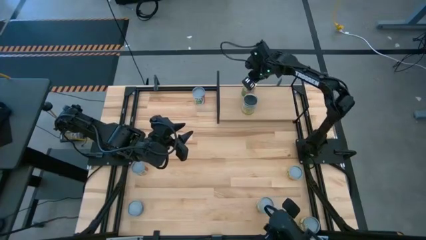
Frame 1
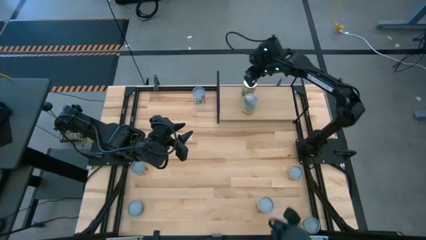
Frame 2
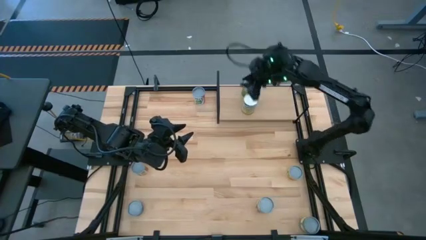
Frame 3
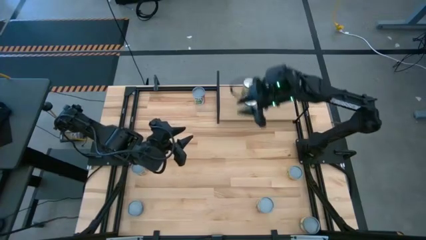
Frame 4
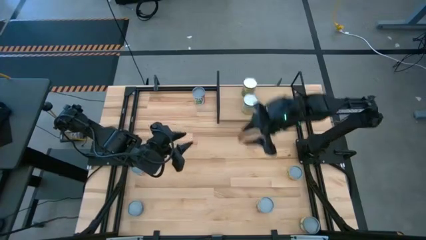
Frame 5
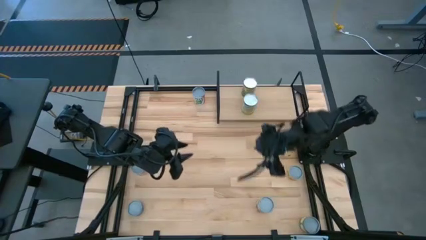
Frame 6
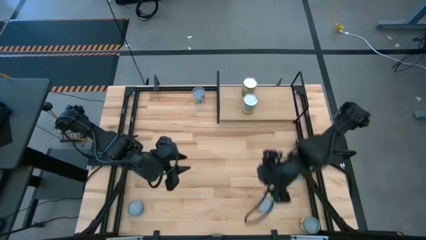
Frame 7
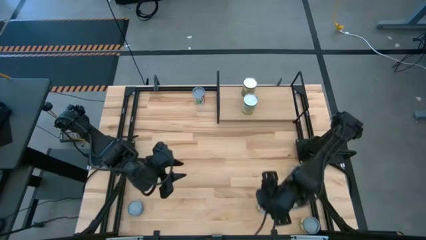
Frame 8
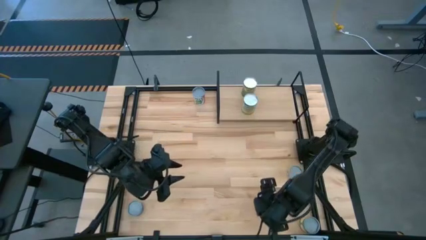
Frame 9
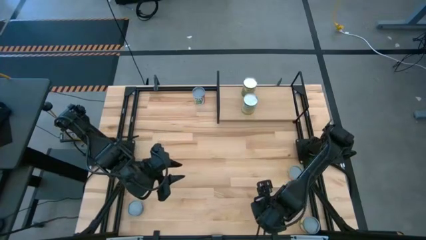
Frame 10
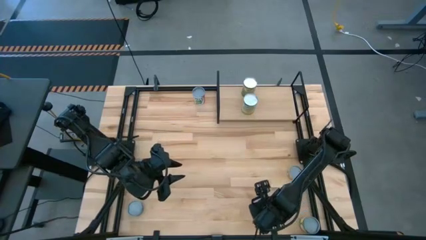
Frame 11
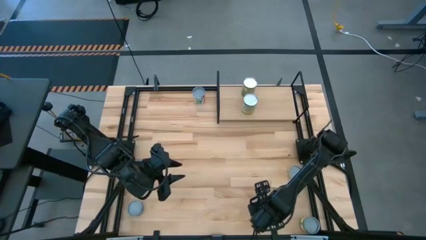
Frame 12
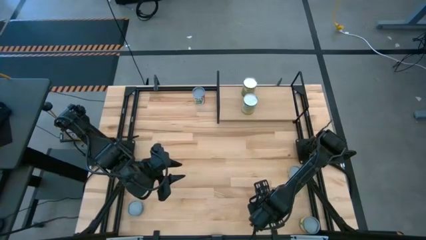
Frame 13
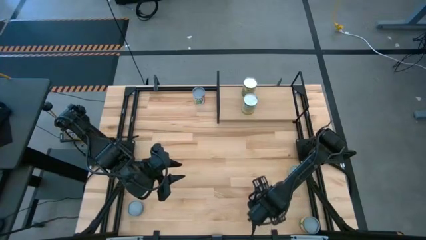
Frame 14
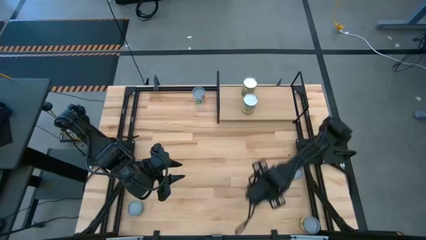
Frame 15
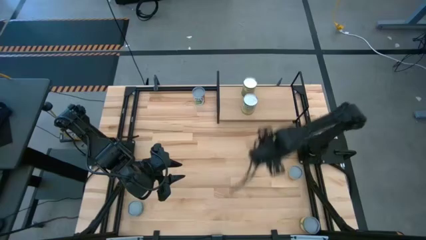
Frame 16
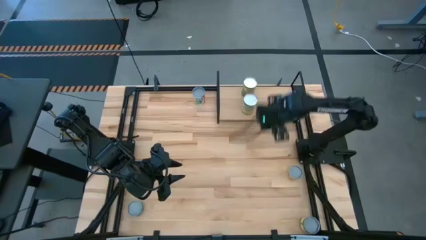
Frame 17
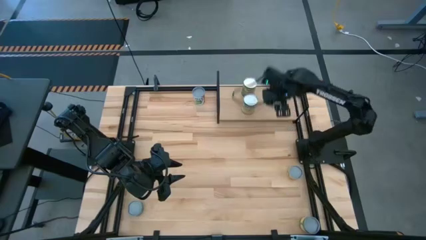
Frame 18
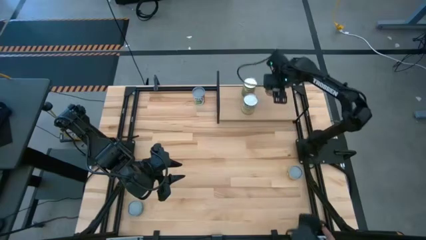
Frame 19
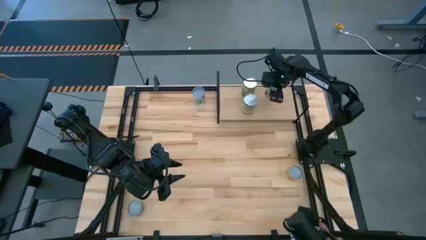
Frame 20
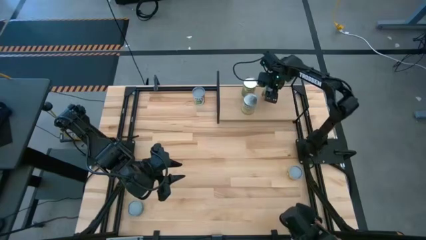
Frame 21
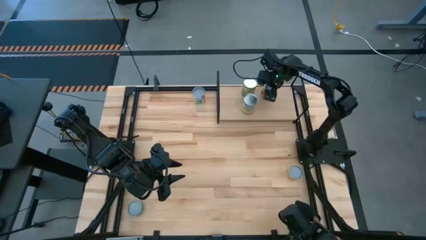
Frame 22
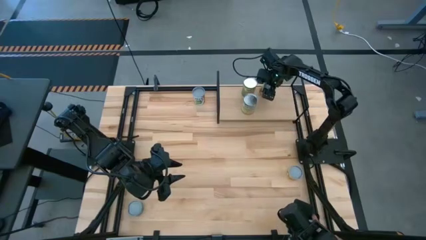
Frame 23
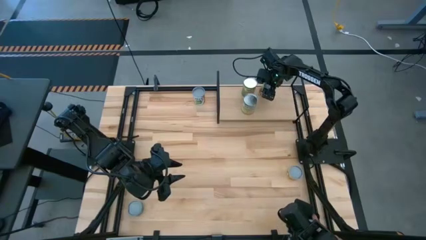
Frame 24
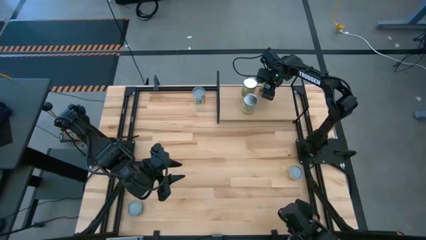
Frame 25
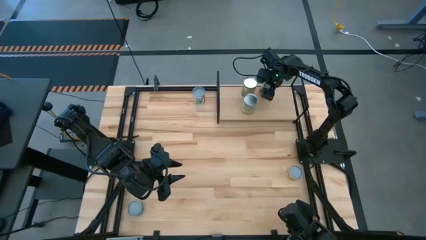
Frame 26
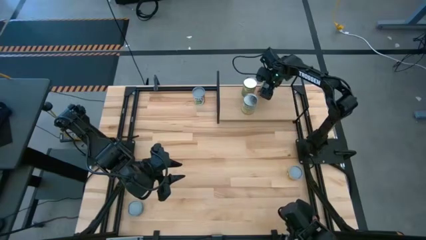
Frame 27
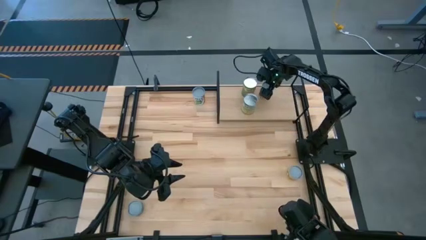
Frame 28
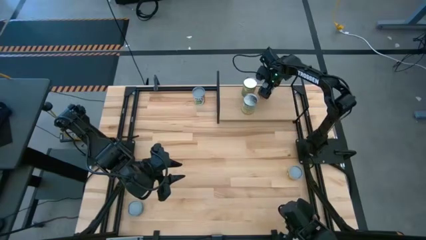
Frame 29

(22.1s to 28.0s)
Task: Pick and place cans onto a shelf
Put the green/red can on the shelf

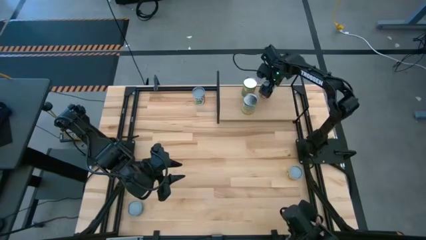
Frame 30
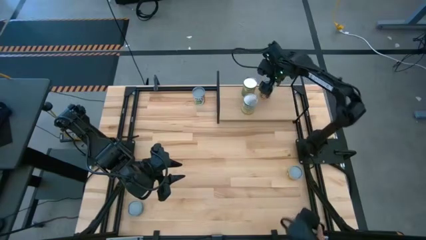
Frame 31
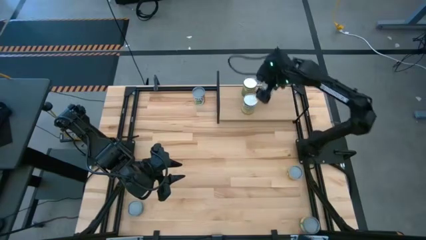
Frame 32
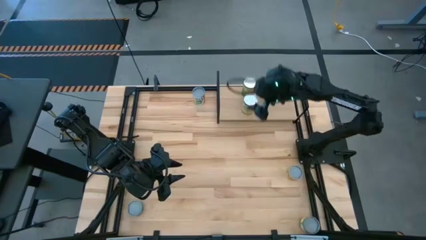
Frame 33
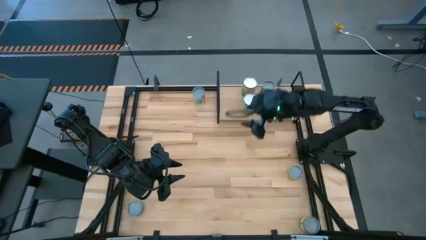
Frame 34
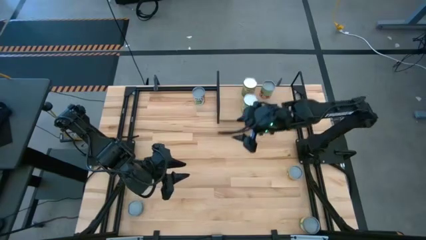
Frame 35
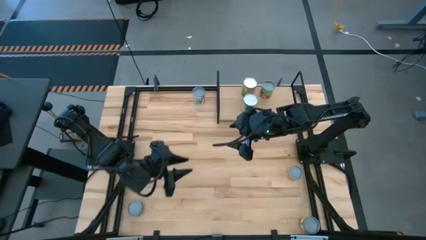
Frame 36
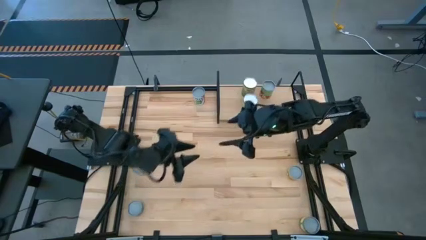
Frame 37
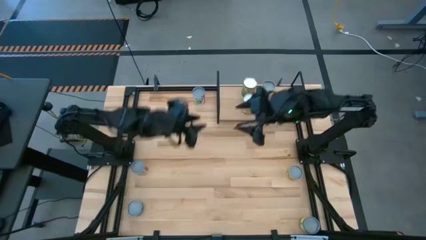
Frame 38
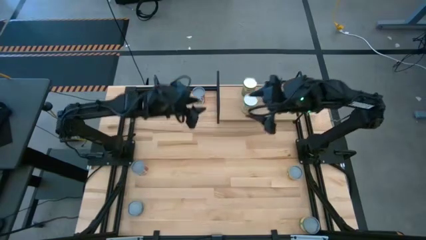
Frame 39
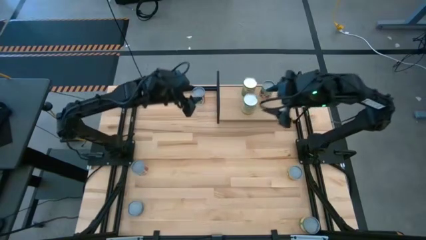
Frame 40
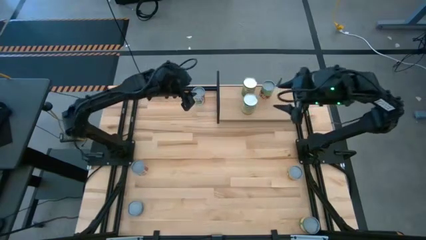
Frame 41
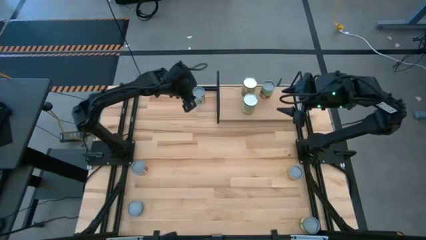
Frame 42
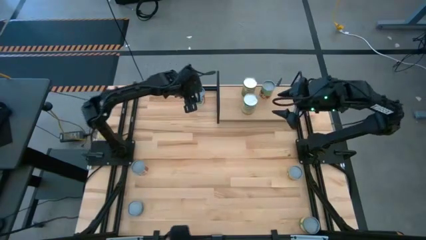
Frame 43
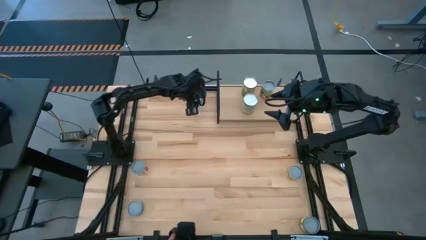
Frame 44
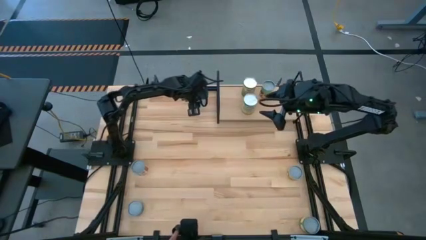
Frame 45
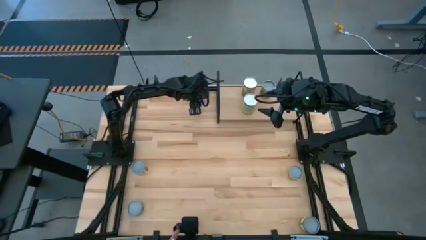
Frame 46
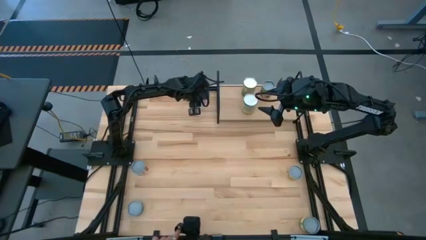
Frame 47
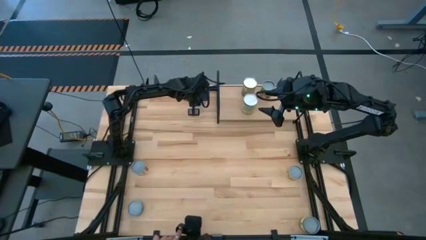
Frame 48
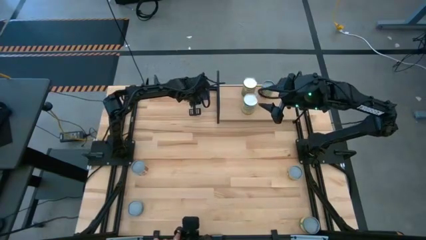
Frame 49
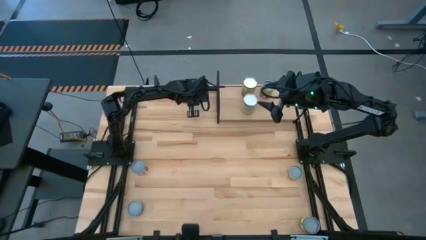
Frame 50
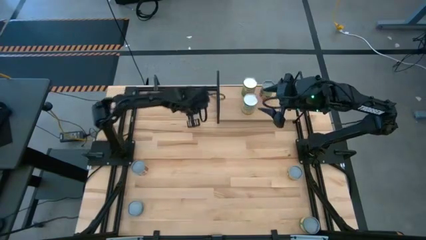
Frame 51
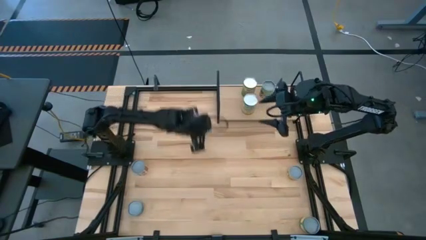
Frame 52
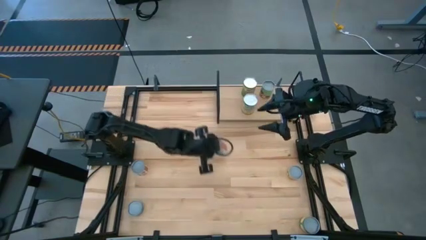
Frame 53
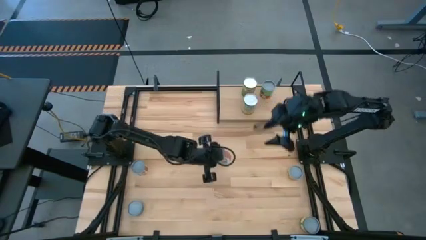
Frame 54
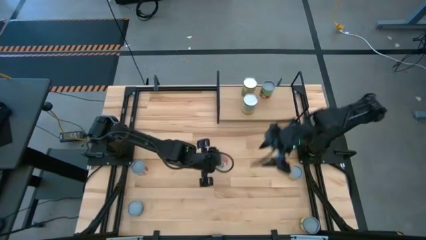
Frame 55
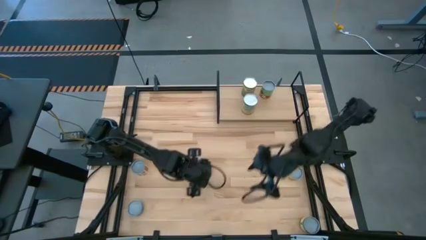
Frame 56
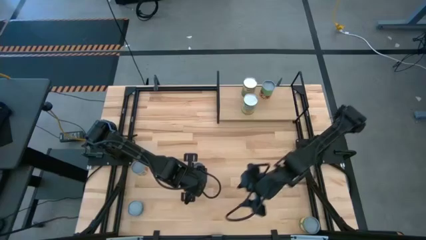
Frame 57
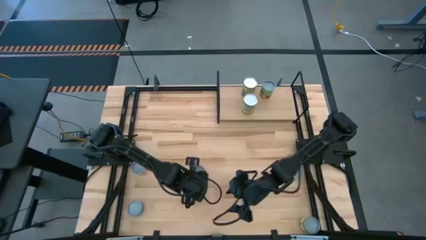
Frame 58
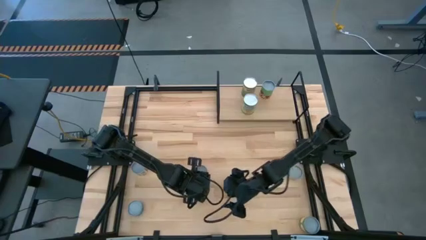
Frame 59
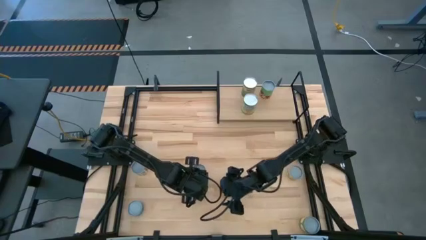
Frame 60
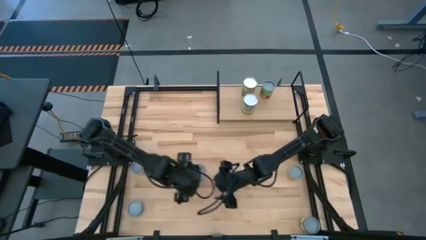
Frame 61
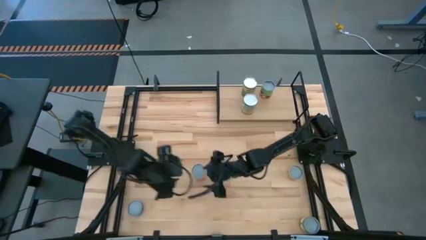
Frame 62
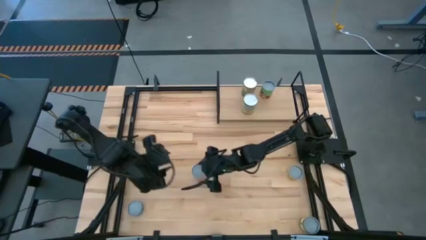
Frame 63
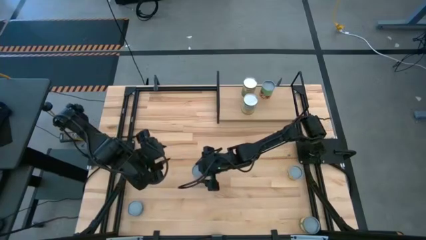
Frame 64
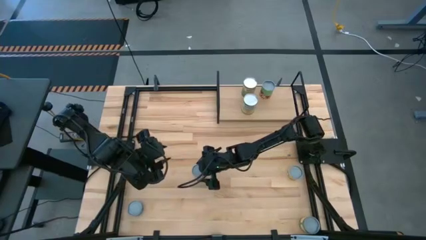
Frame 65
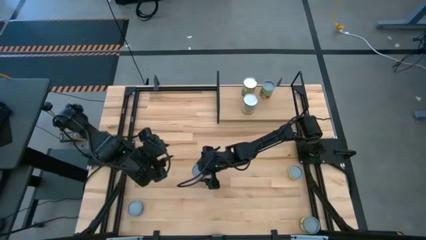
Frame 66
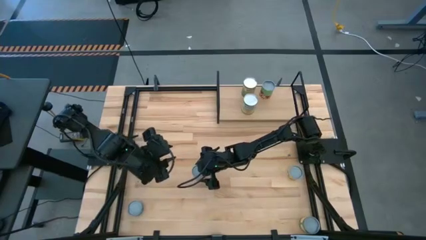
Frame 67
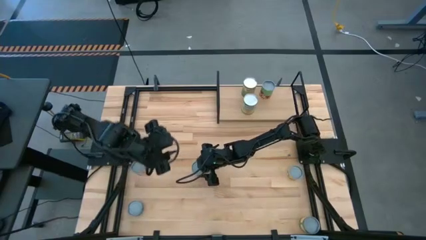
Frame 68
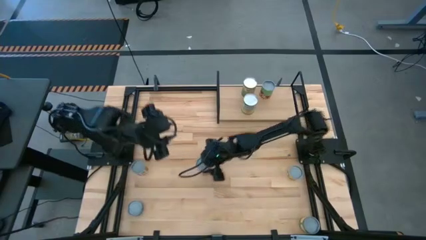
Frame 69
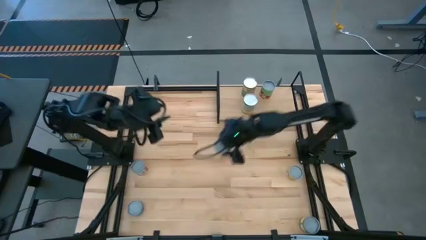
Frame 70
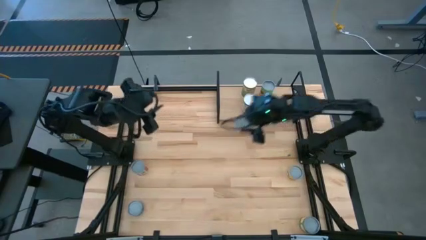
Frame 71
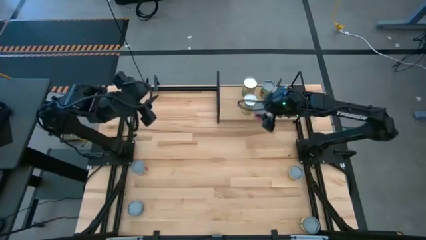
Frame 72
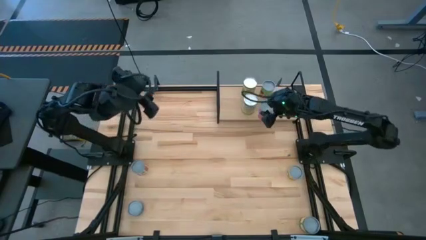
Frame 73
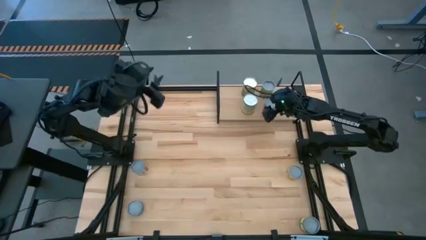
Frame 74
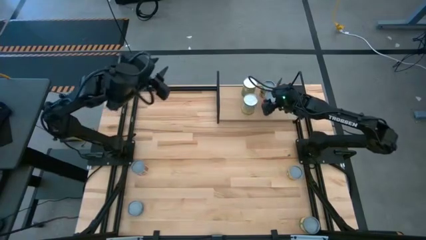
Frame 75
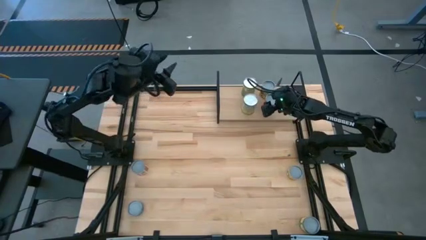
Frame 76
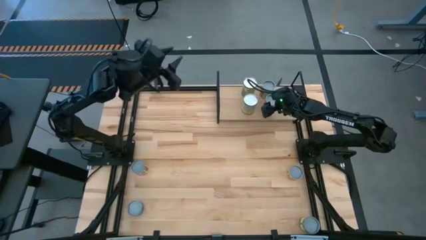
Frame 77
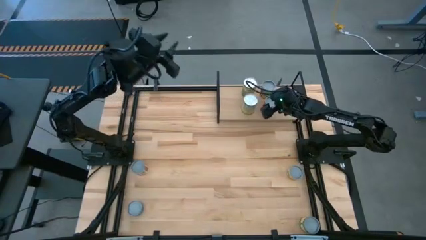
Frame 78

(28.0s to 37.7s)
Put the white/red can on the shelf

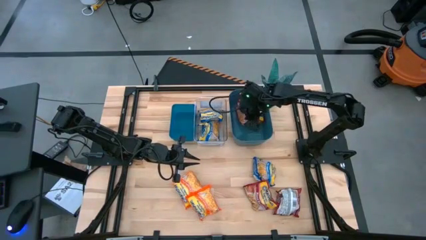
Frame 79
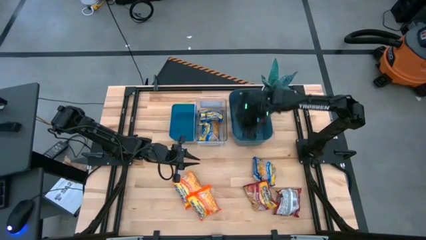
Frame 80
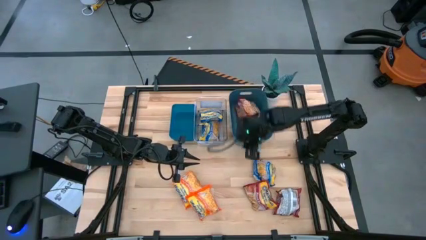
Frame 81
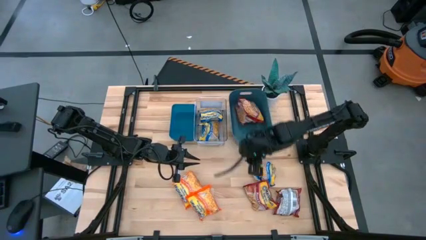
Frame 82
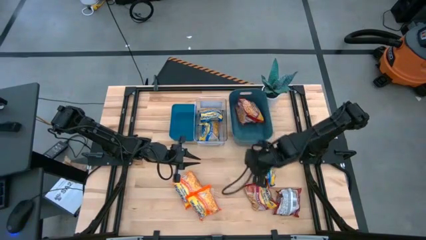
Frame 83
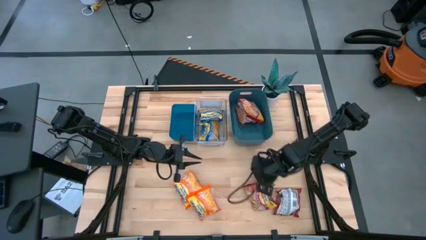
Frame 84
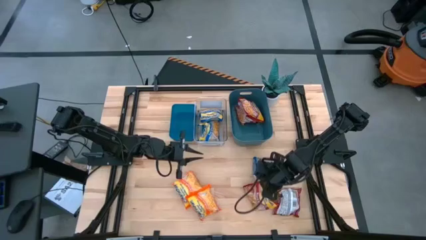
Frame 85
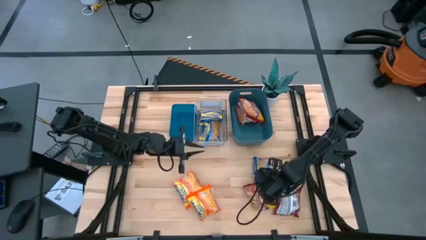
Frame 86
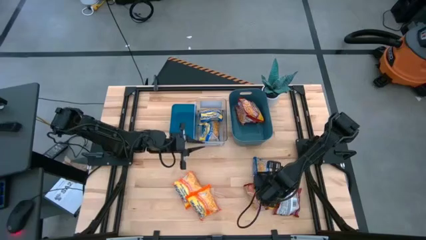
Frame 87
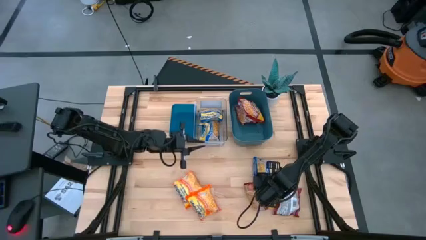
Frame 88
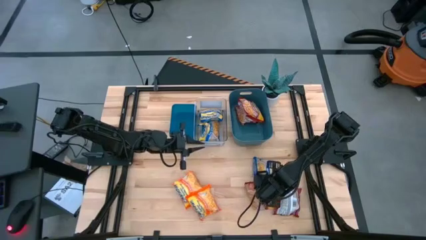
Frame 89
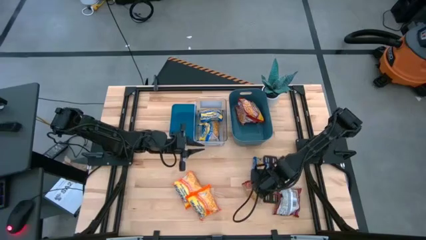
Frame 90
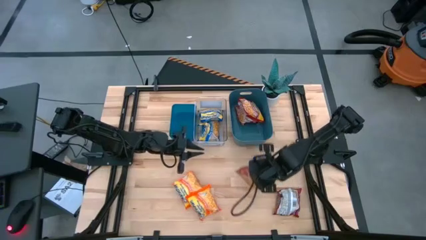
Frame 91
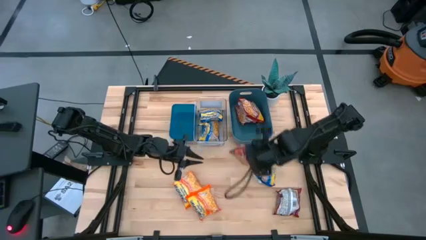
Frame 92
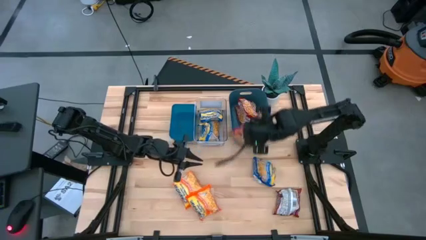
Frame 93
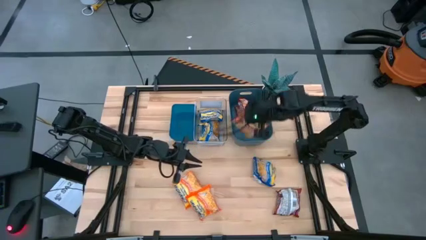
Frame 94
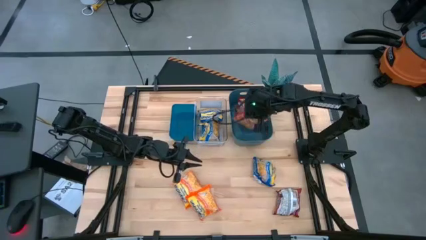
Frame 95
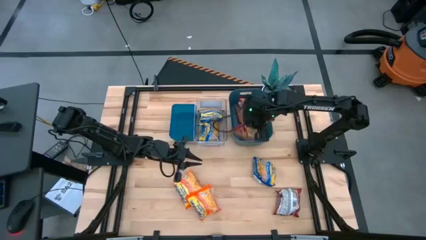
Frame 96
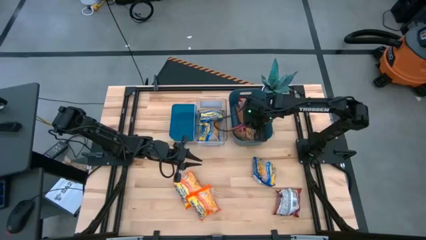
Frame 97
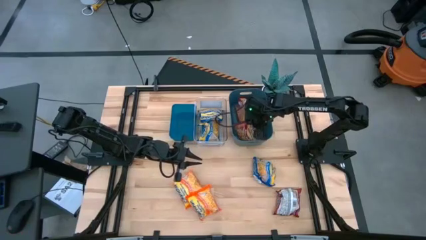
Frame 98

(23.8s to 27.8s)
Task: Sort Maruchan noodles
Put the red noodle pack into the dark blue bin
